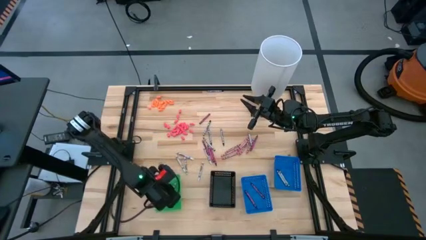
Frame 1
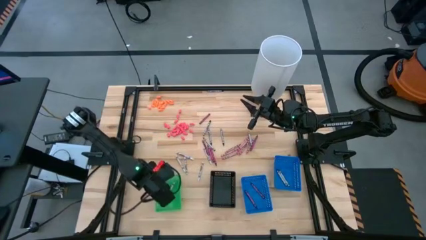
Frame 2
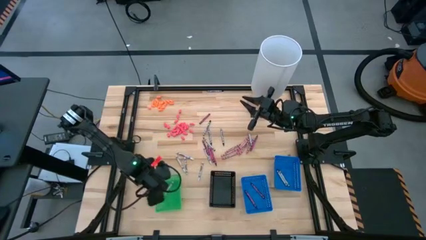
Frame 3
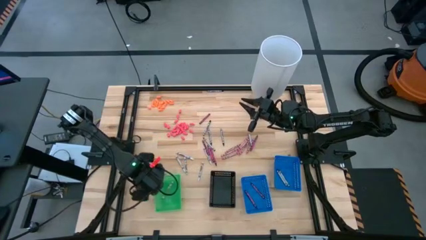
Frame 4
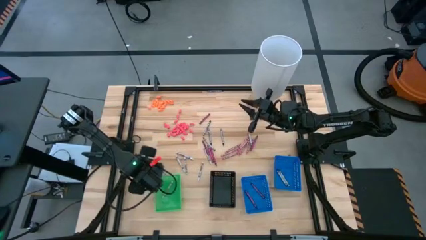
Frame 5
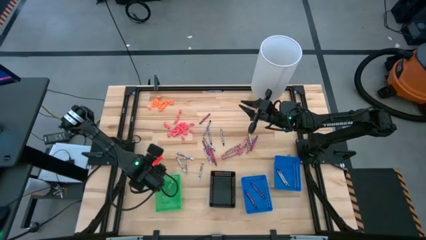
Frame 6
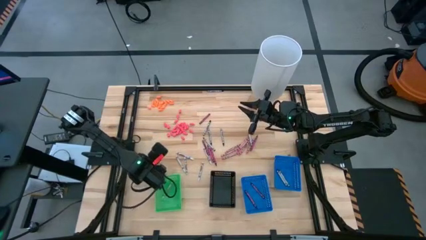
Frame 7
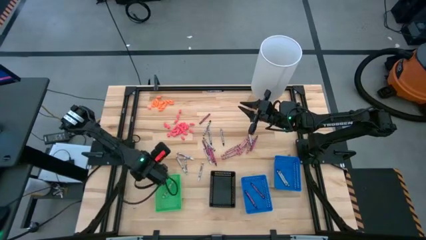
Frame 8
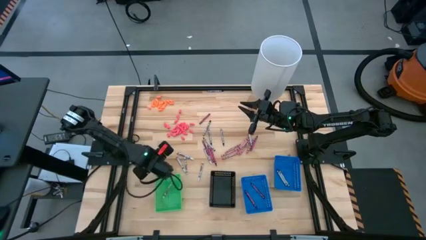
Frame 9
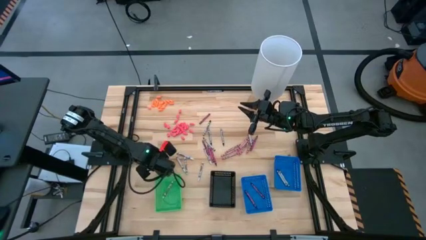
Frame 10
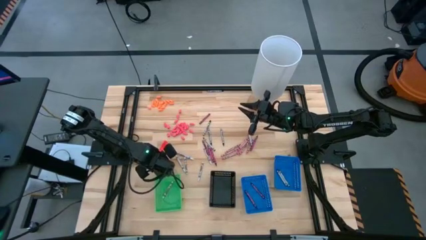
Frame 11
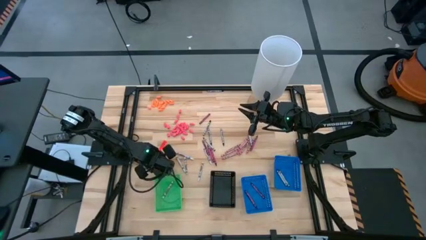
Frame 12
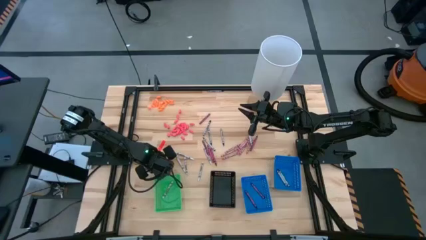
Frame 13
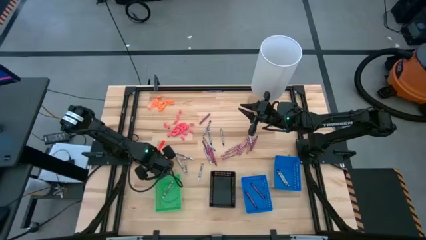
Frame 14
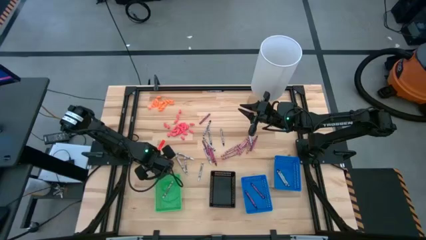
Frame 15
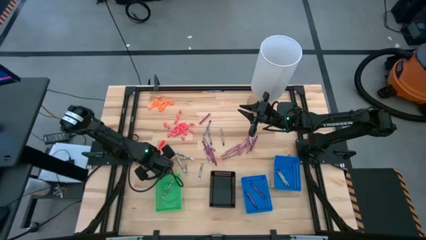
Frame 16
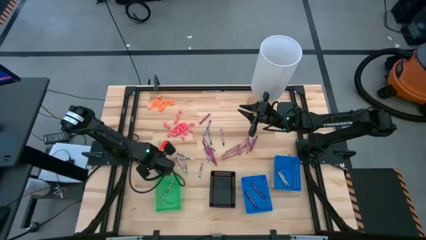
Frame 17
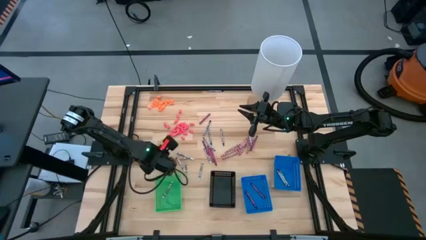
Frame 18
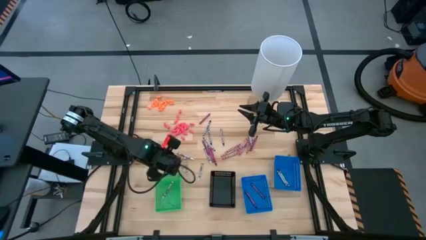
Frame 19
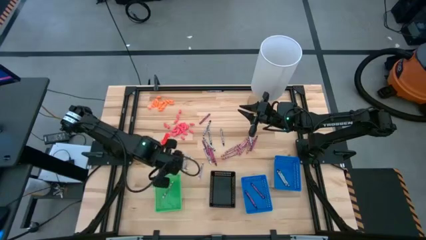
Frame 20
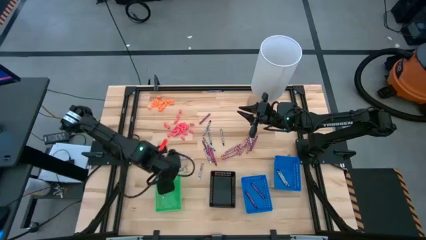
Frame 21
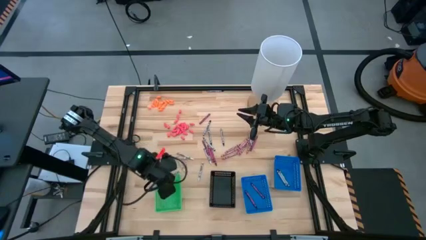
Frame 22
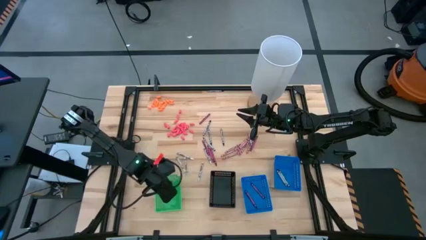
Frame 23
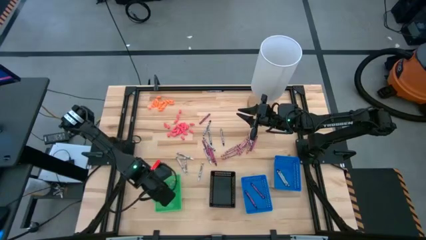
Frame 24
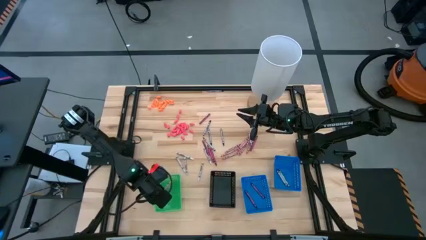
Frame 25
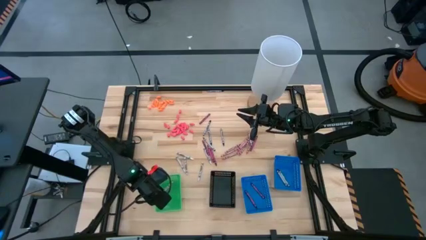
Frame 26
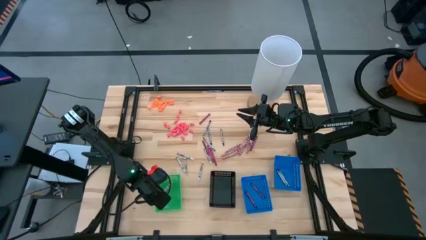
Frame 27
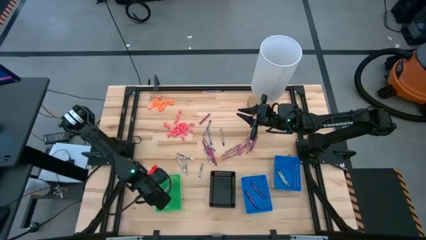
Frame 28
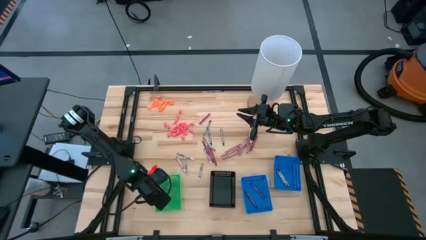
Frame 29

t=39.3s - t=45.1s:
Task: Sort crayons
Put the white crayon into the green bin

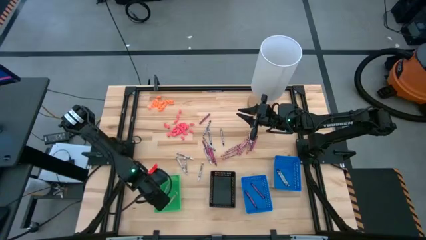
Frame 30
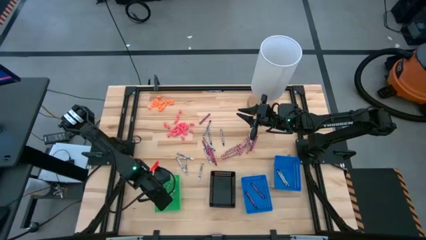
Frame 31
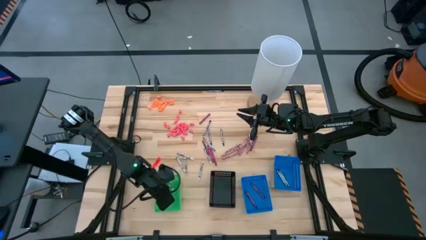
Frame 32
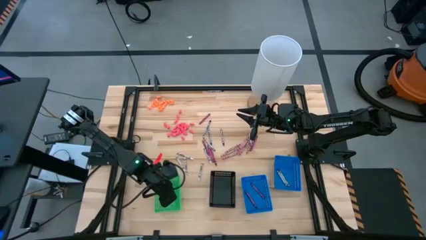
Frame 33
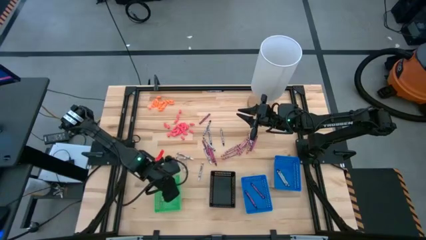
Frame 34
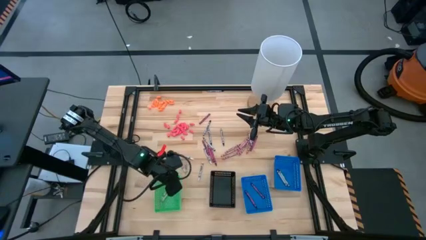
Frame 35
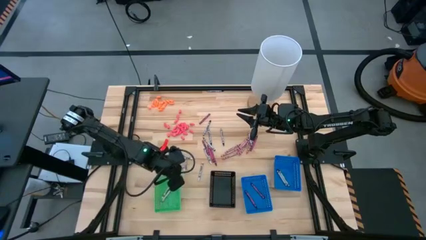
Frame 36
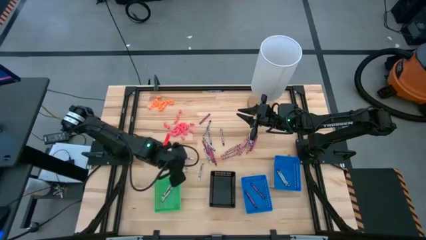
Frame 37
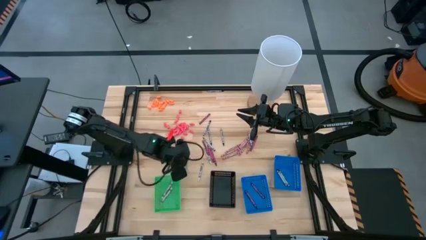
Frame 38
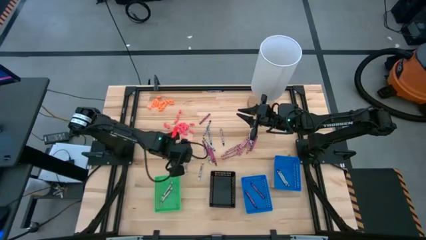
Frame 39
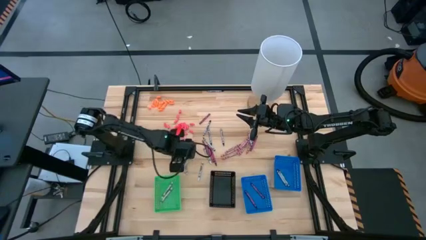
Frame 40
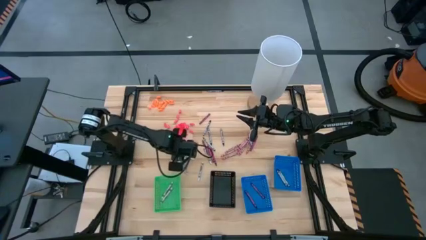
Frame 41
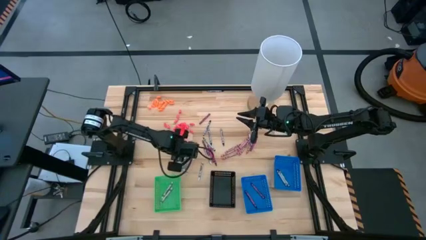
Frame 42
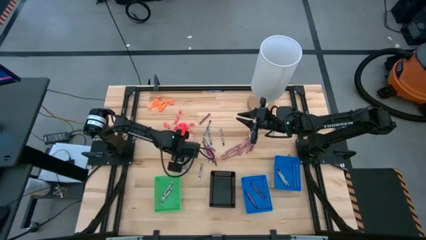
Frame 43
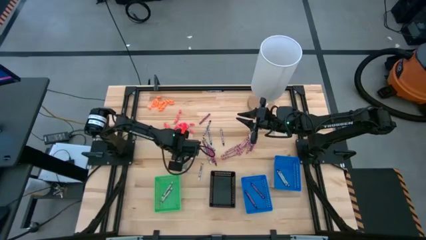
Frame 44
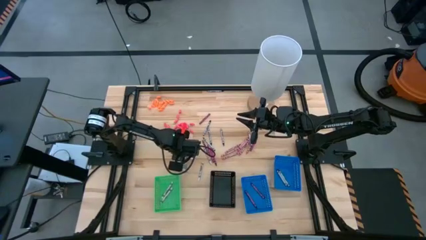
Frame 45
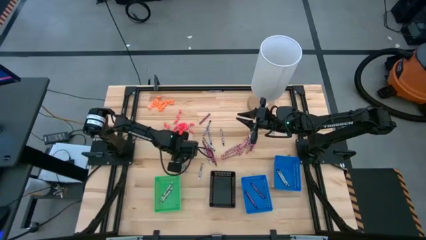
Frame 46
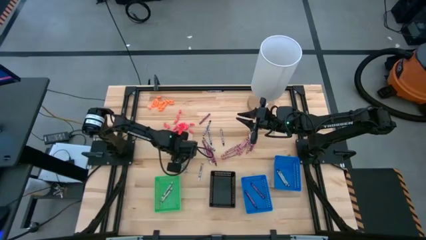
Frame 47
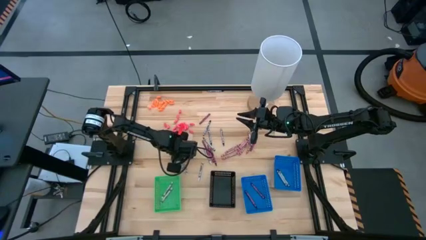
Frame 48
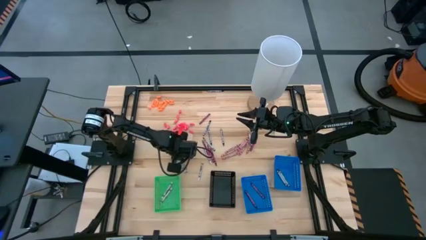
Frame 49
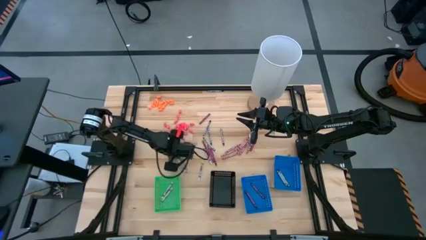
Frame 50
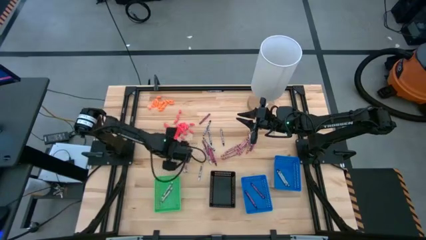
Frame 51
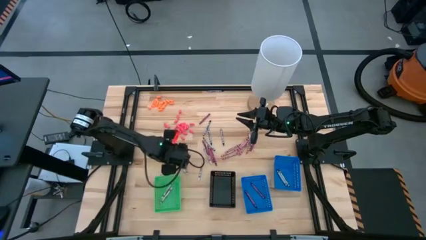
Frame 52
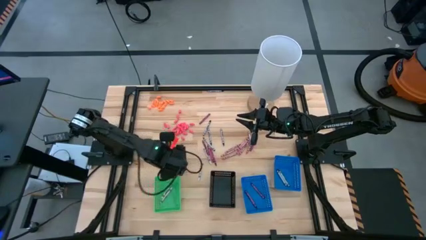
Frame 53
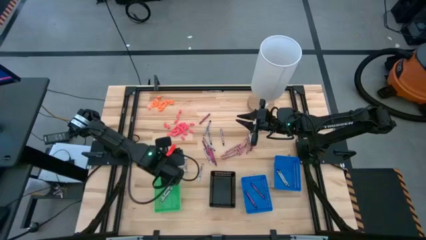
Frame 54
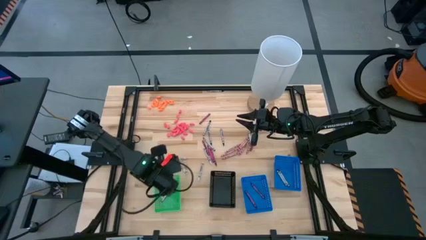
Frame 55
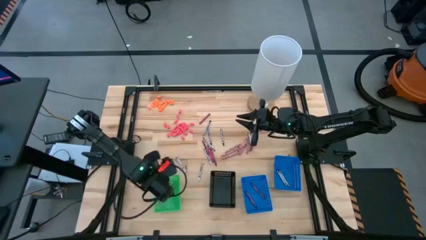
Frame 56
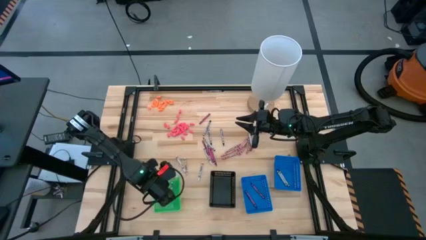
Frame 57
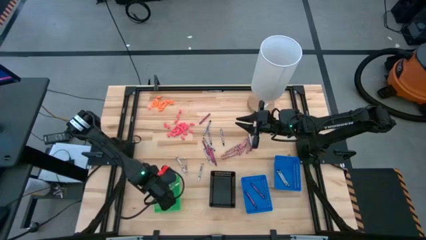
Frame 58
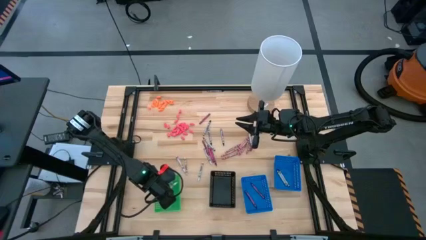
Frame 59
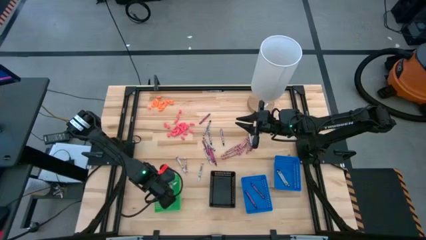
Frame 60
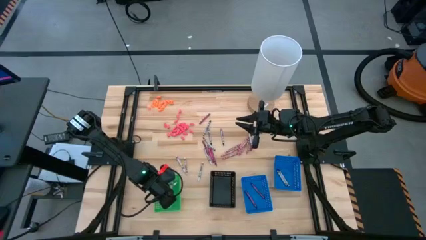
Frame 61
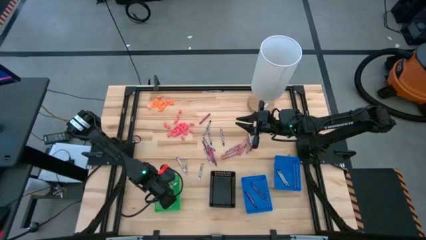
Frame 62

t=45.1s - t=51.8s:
Put the white crayon into the green bin

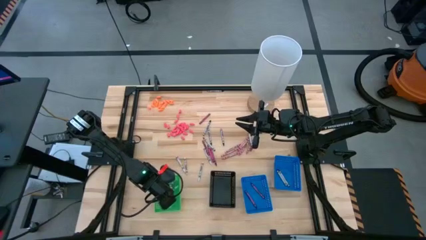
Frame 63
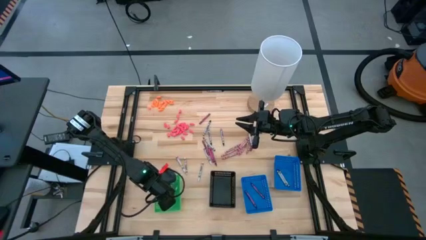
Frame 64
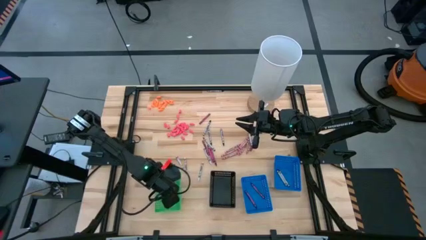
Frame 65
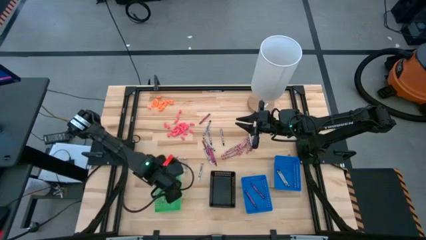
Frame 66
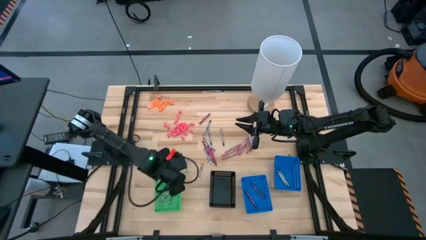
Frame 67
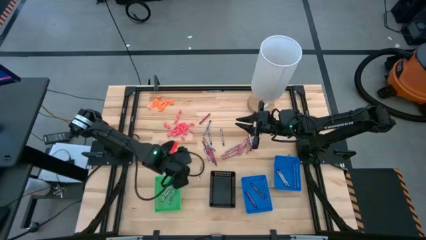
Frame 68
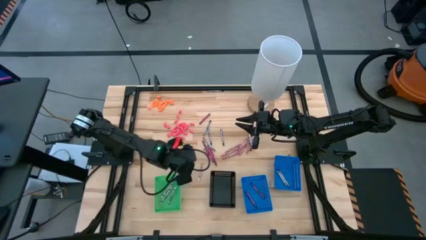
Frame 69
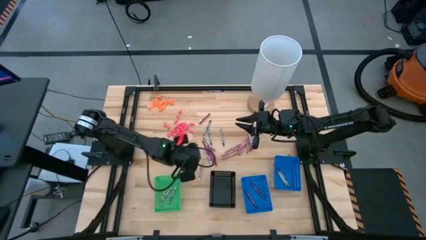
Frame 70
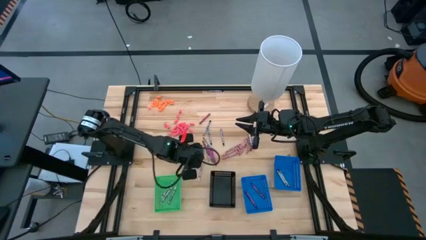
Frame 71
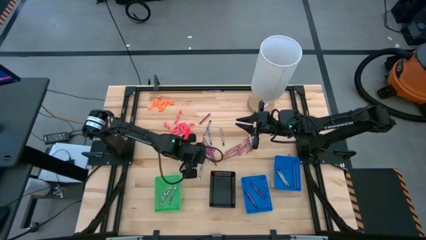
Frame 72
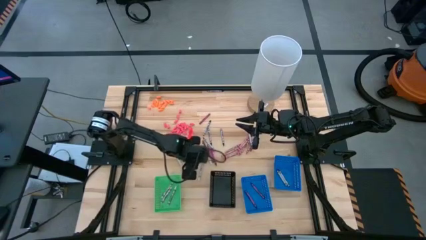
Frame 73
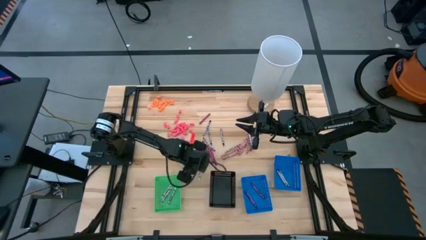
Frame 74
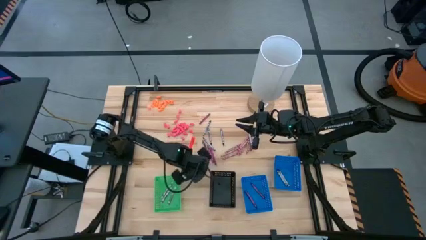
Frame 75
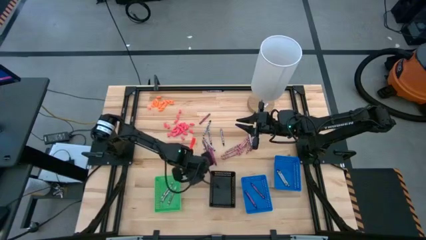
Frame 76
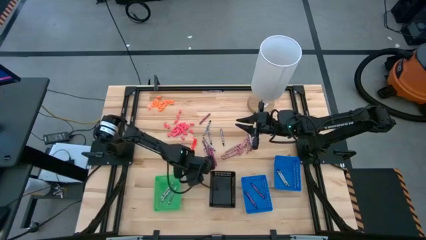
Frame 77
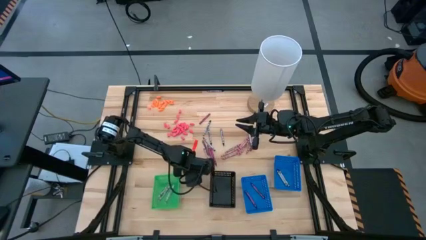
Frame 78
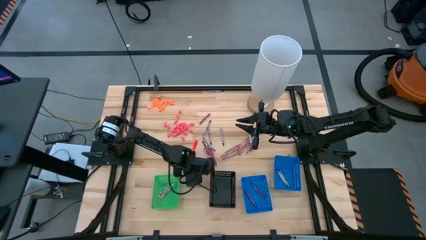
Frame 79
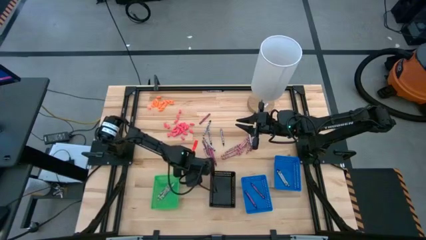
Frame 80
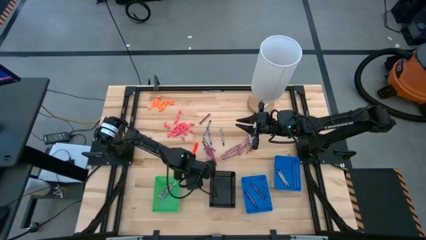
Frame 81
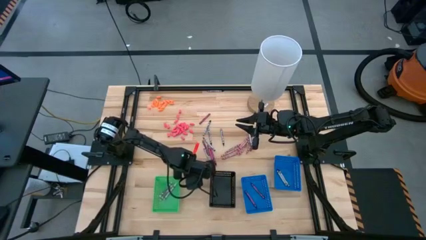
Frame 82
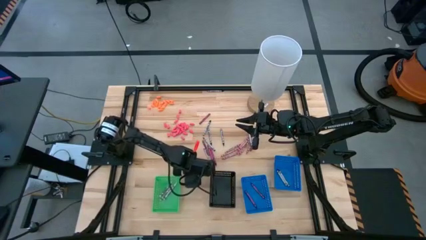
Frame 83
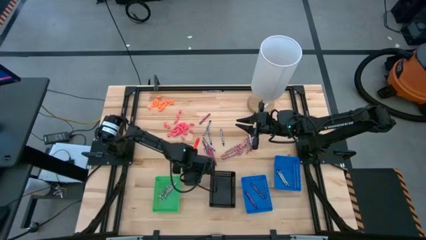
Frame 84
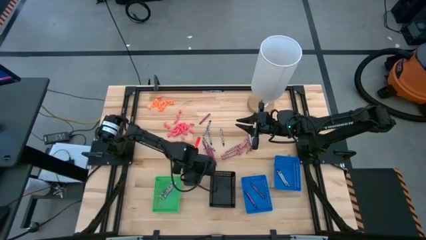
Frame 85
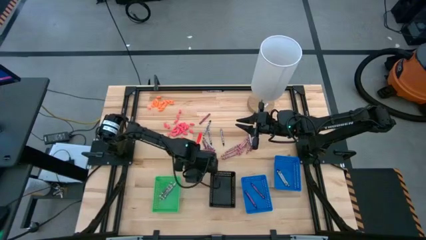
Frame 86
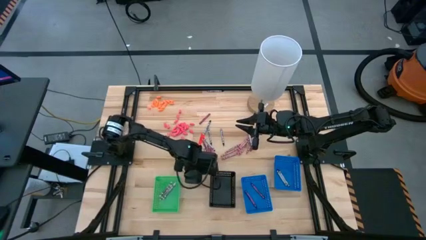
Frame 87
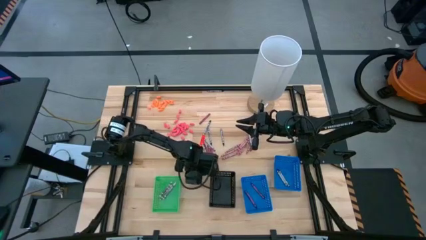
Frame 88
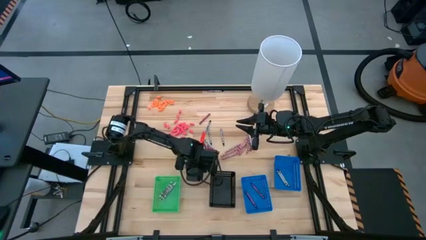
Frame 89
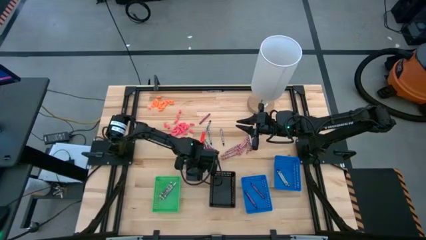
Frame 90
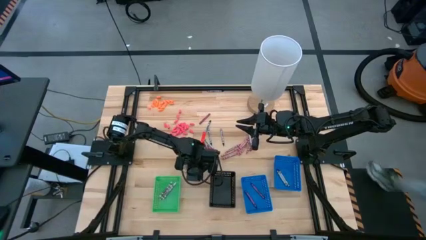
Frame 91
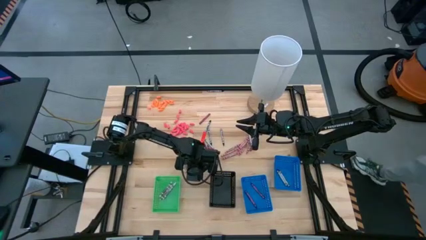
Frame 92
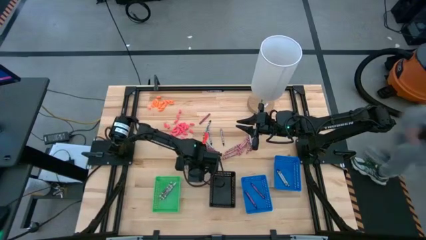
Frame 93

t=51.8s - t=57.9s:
Put the white crayon into the green bin
